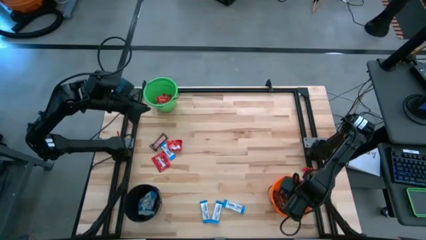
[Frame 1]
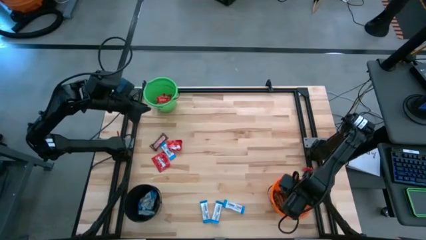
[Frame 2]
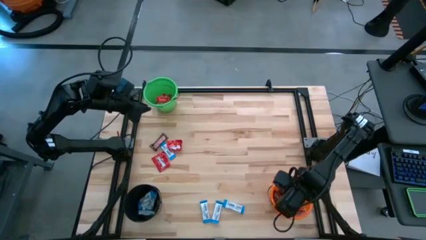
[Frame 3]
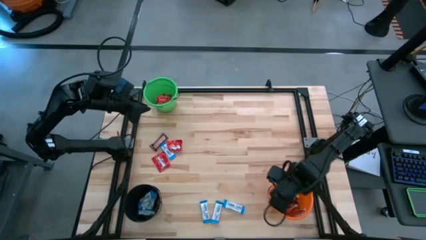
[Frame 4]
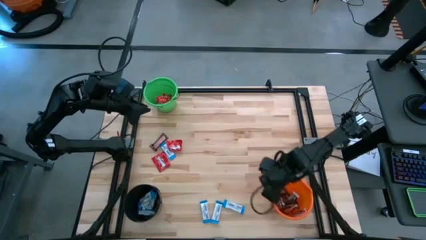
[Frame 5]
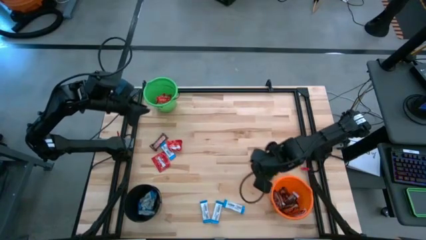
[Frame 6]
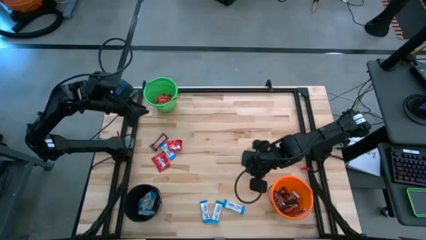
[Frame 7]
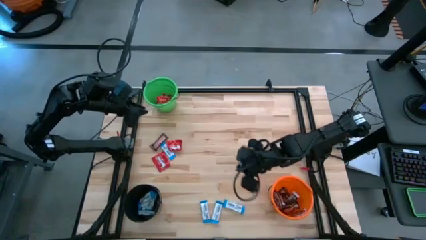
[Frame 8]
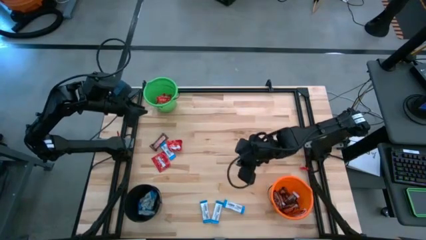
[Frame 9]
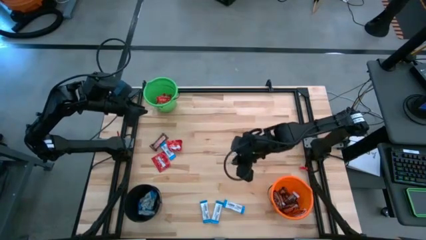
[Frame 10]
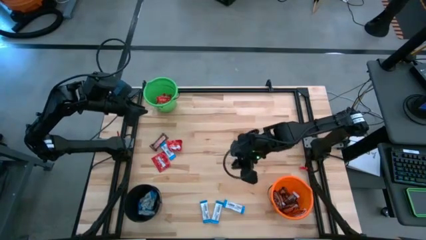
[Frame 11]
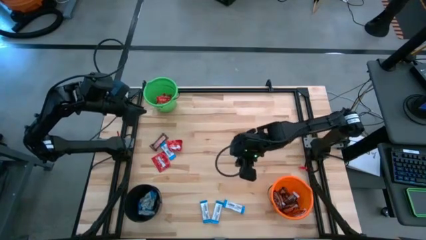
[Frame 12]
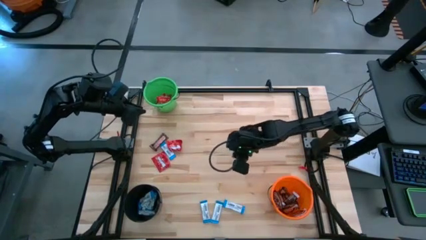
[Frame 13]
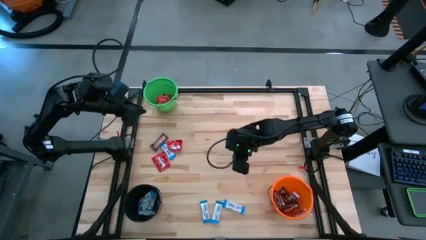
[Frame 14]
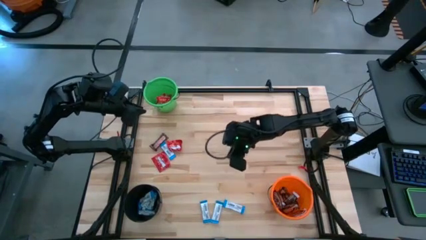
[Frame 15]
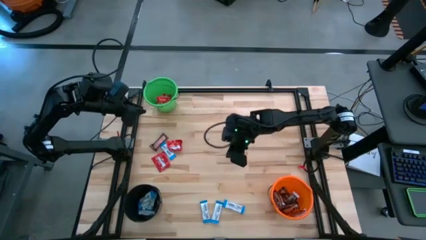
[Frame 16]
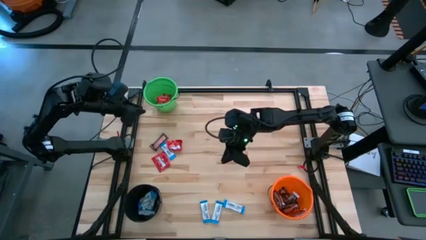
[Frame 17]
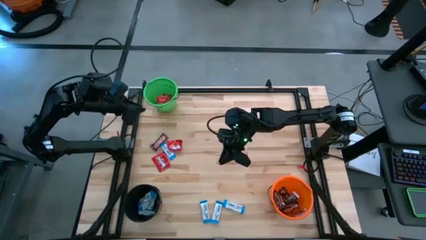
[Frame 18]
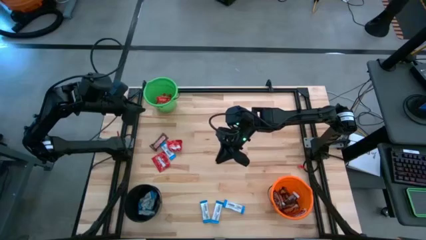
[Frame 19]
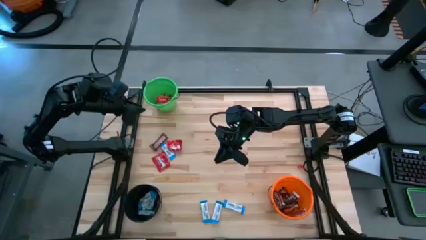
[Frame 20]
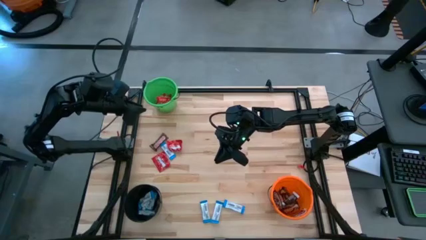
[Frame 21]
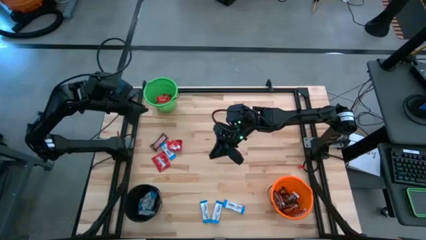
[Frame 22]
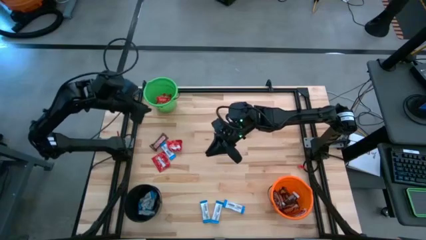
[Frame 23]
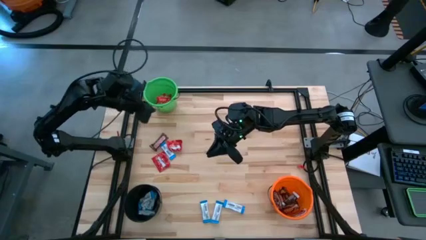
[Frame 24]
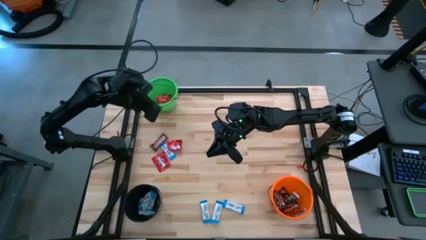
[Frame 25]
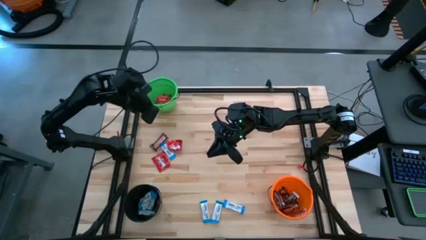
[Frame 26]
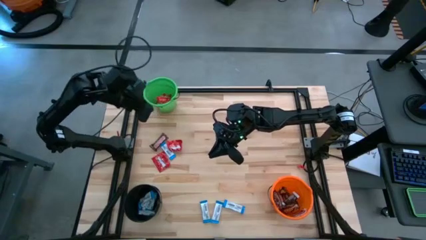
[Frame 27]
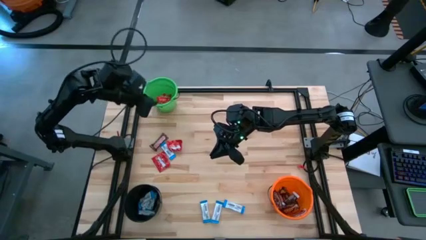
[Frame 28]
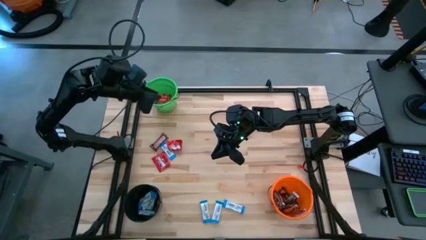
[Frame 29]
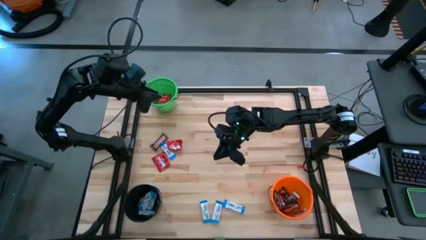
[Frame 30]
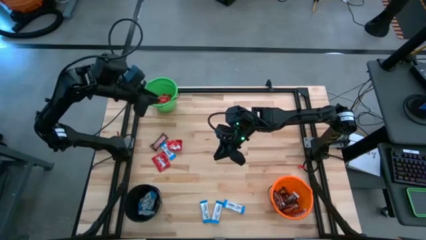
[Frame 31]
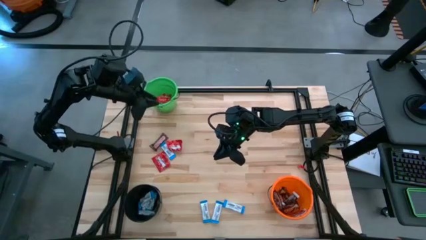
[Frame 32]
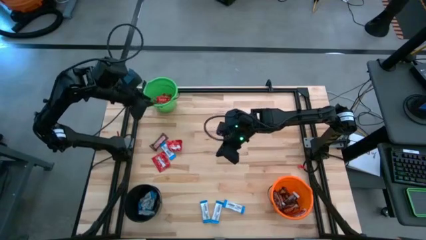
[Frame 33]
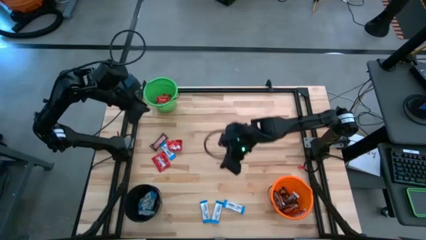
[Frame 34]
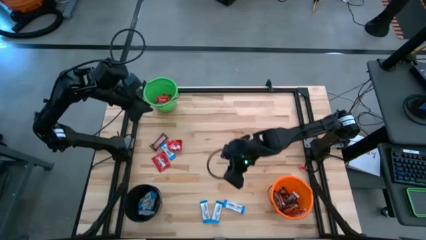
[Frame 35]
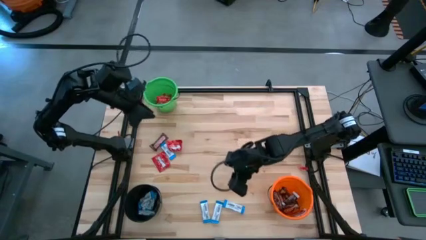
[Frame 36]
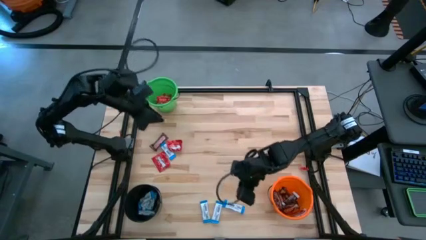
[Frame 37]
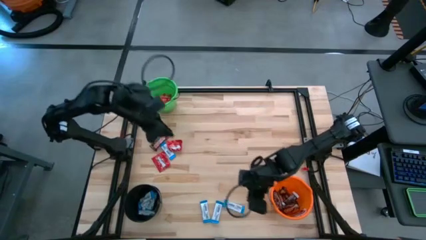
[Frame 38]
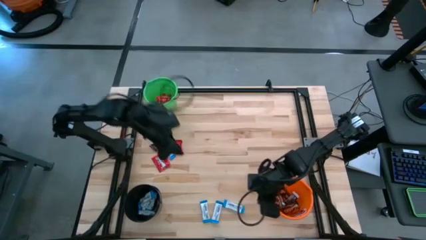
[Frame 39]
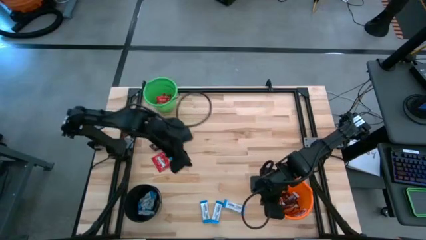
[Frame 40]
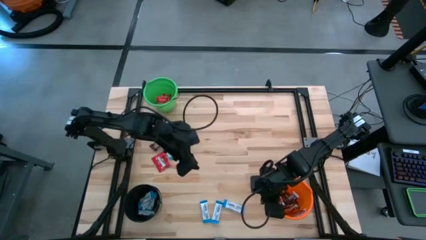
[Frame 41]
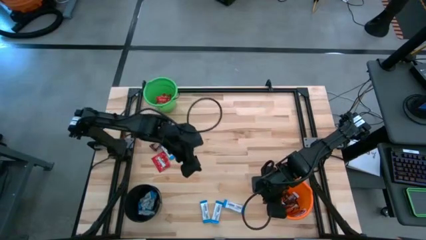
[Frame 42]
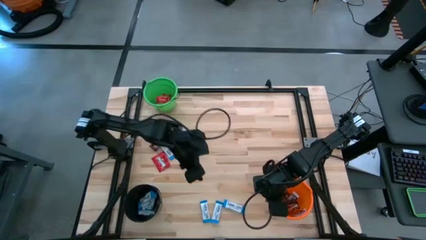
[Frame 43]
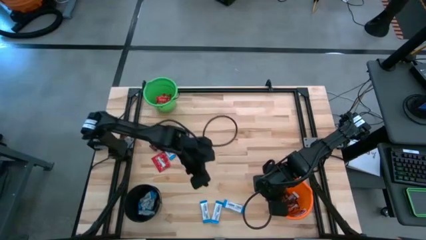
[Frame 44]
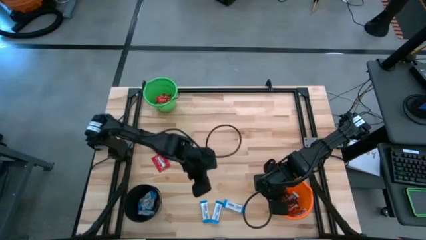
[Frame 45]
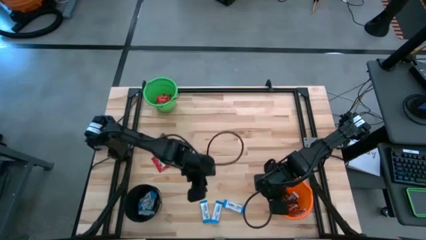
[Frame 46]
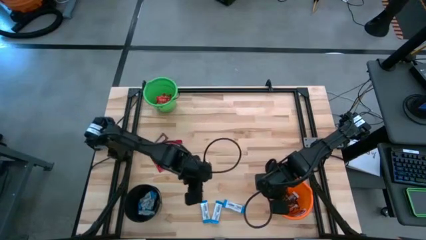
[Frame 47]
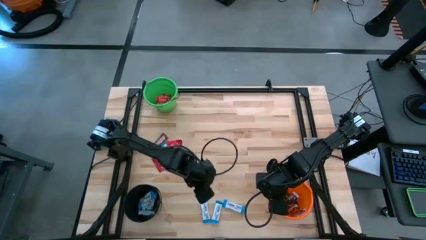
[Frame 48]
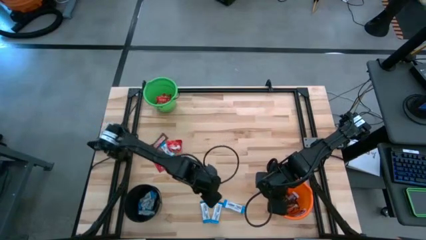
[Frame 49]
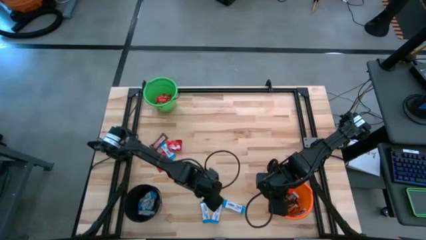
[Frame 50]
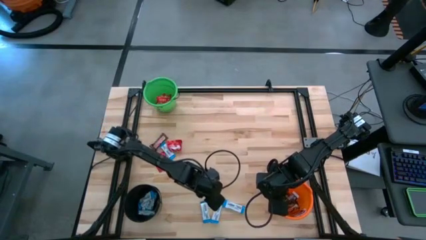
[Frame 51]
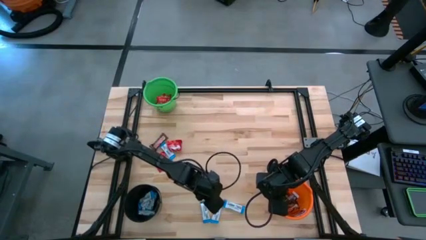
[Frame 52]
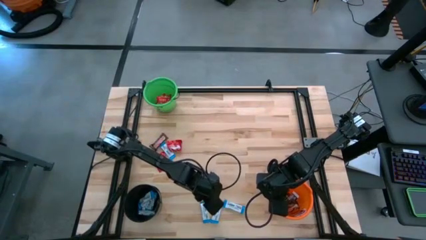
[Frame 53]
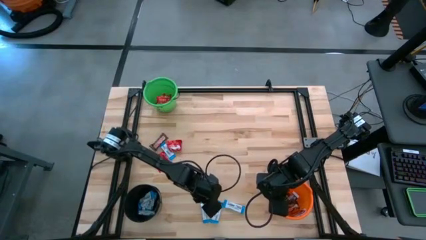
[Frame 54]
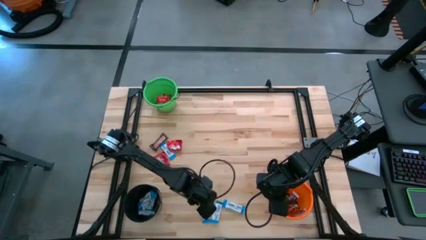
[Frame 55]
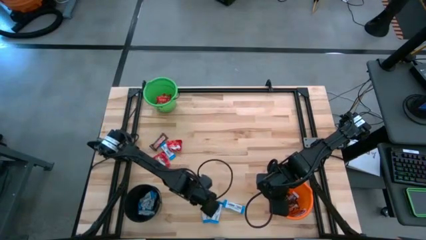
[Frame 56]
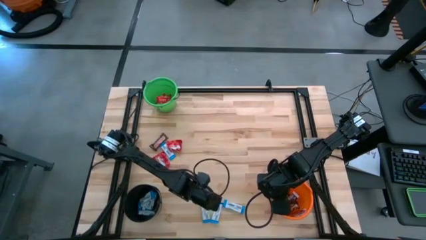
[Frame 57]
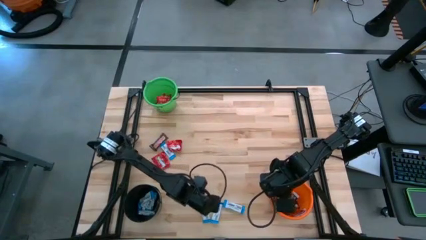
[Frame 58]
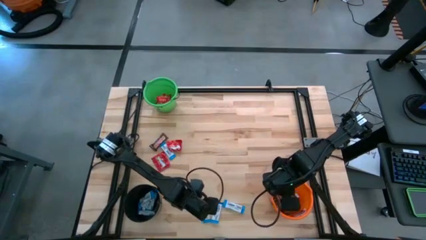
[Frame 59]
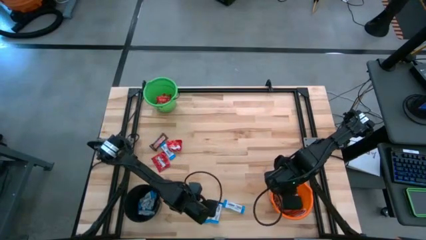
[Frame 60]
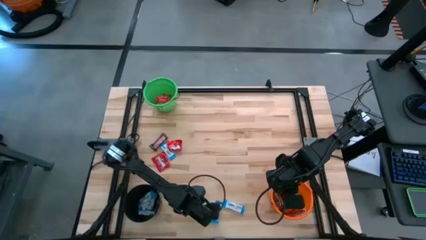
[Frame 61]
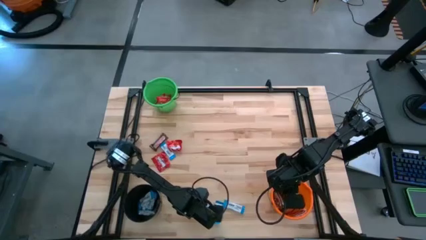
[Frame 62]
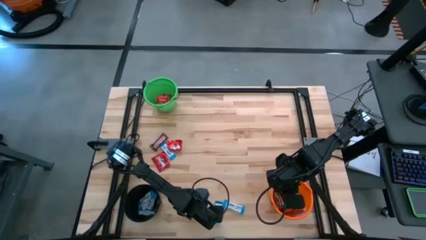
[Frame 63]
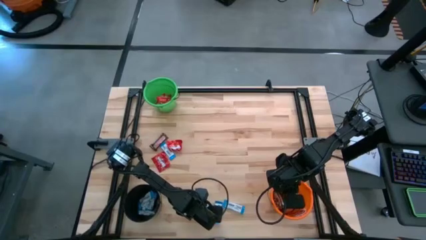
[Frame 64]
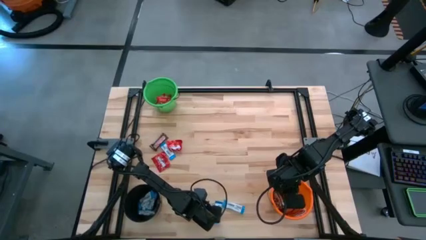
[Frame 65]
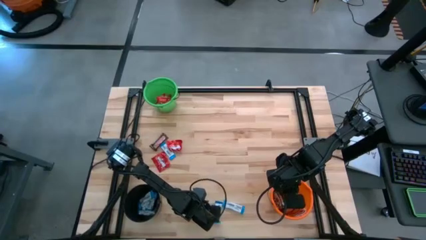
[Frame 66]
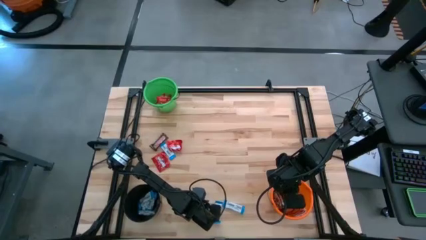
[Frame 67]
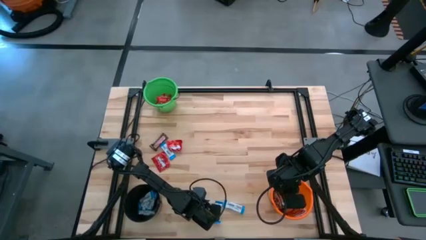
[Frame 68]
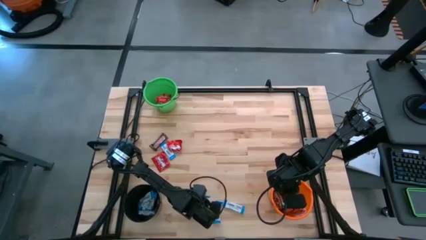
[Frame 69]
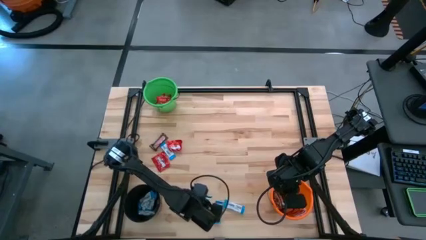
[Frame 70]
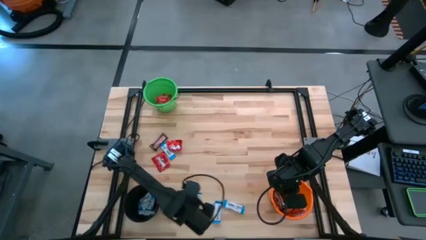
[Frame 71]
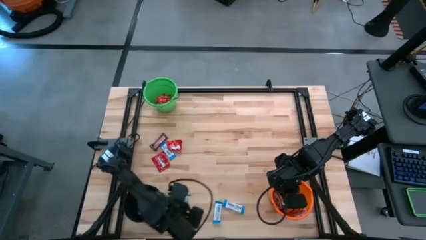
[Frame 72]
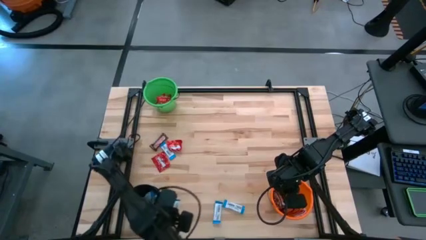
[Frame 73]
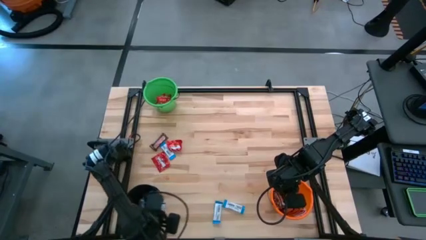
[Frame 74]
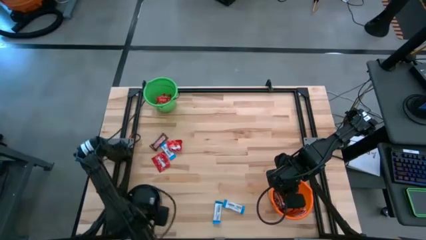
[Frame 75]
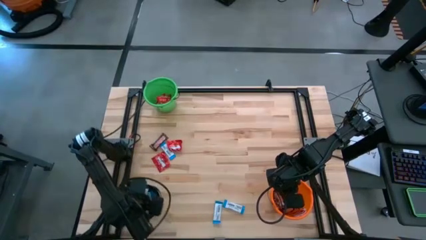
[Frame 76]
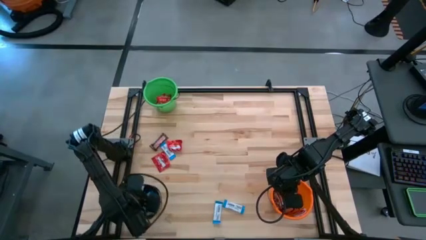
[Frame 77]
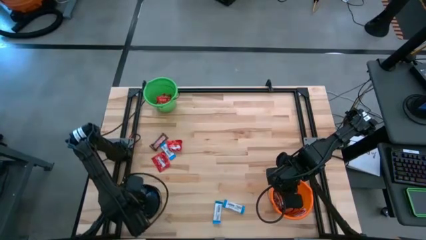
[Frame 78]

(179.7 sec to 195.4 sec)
Task: Sort candy
Put the white chocolate into the black bucket

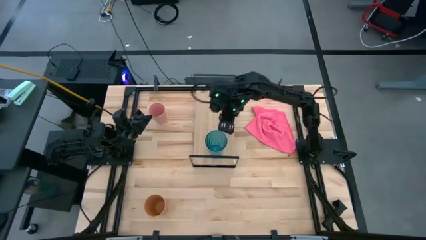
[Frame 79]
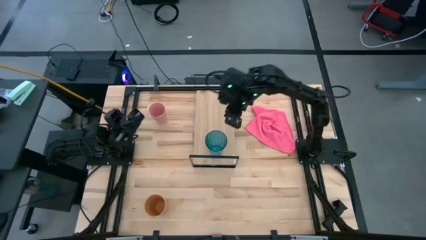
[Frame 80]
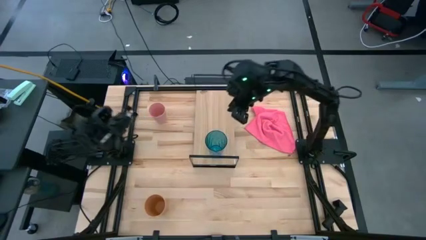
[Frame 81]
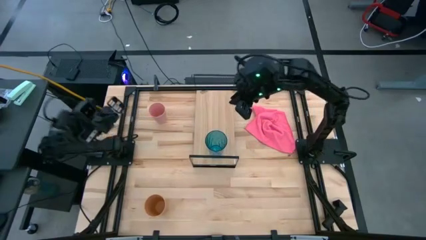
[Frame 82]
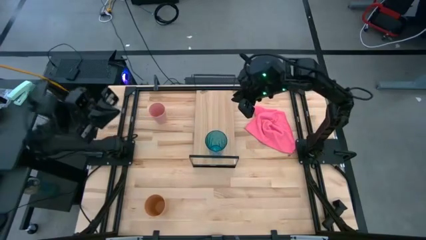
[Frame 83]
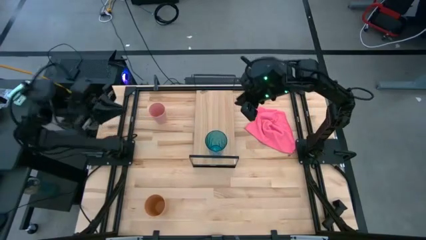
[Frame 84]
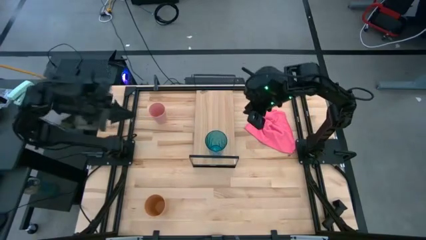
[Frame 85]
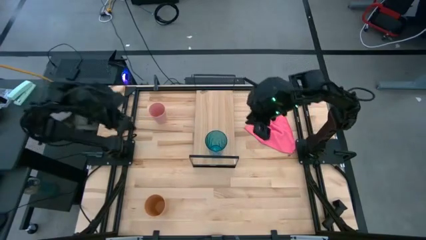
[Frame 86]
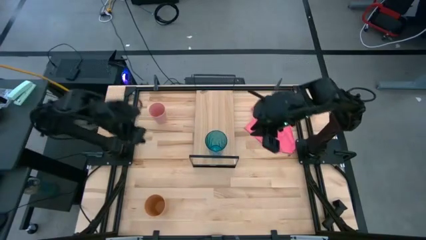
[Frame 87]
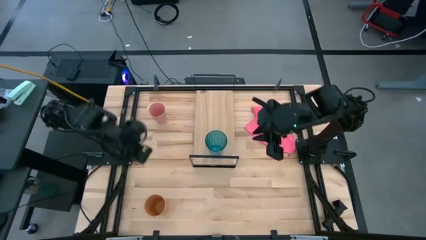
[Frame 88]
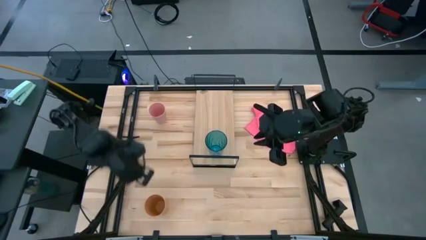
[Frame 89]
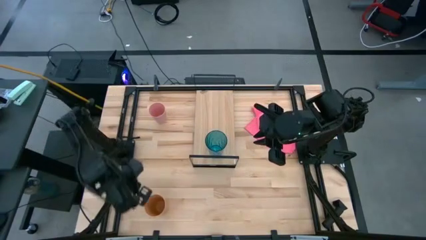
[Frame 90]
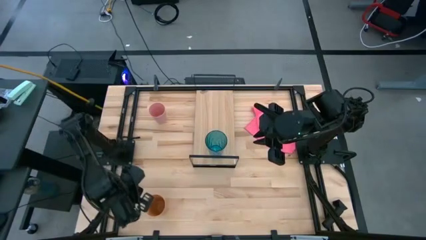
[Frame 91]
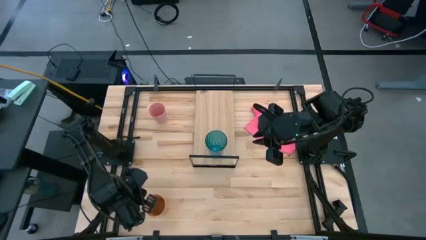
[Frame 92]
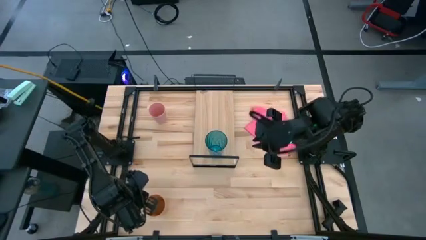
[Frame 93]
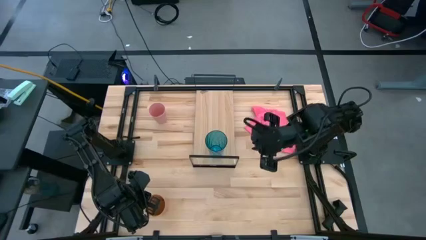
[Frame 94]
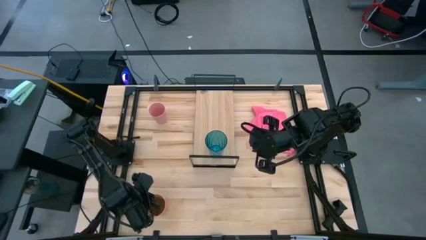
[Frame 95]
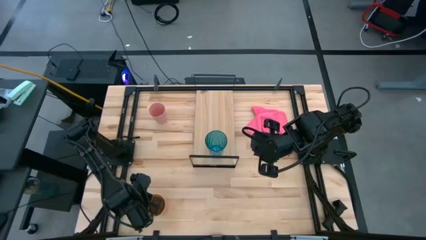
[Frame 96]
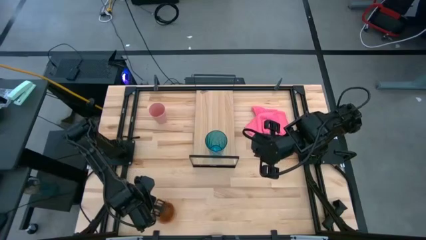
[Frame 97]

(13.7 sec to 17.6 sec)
Task: Stack small to large cups/mugs on shelf
Put the brown cup on the shelf
